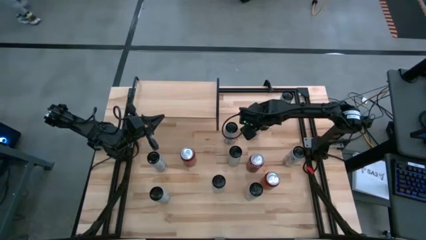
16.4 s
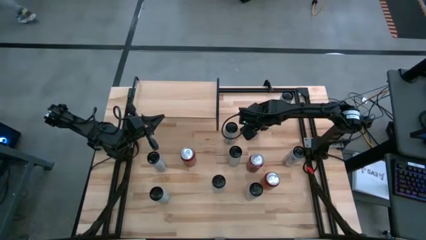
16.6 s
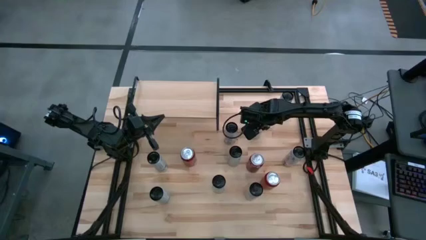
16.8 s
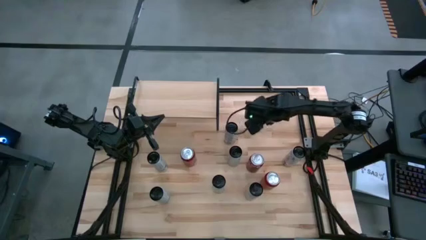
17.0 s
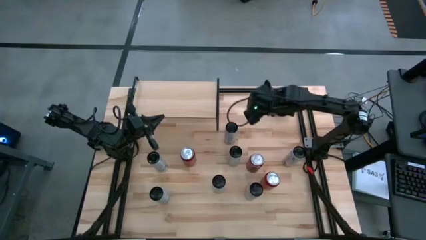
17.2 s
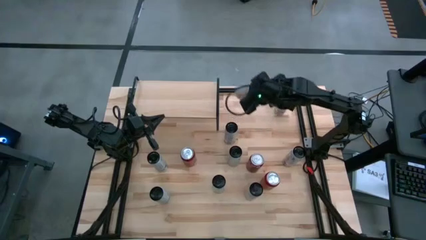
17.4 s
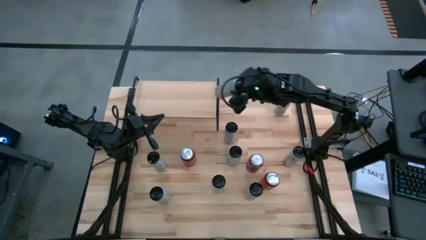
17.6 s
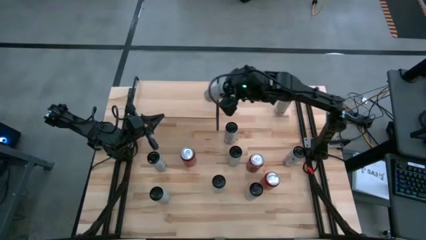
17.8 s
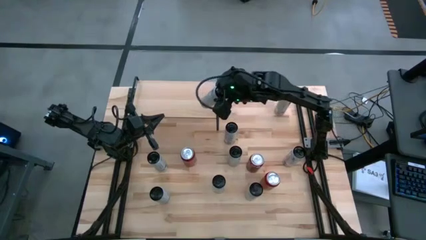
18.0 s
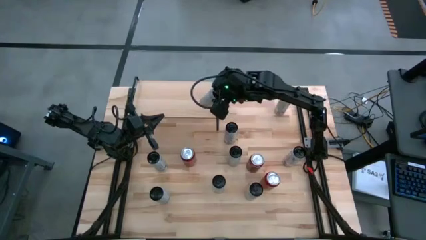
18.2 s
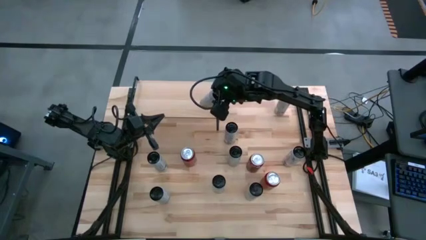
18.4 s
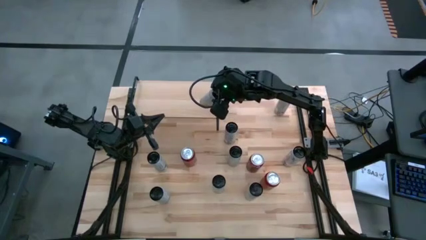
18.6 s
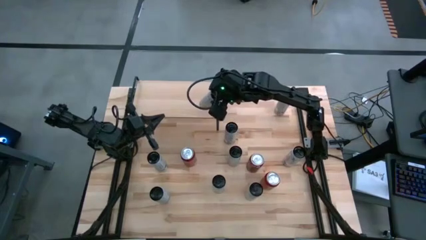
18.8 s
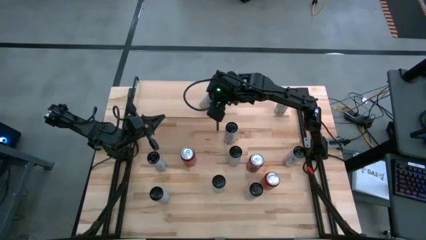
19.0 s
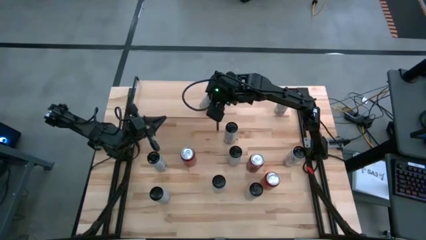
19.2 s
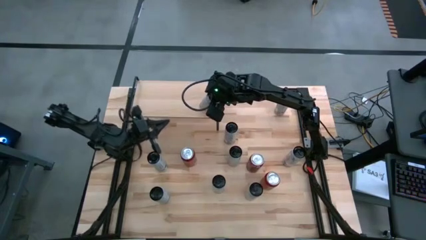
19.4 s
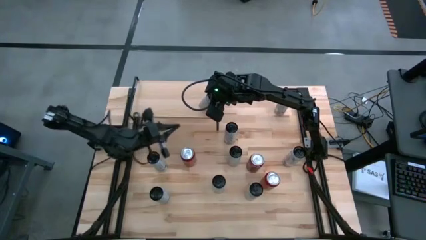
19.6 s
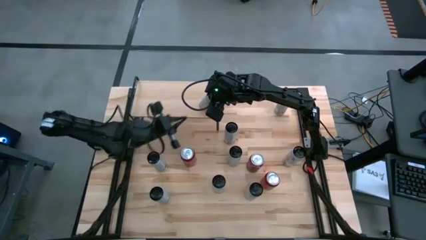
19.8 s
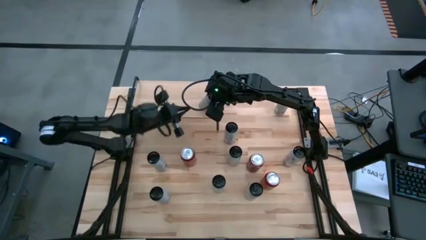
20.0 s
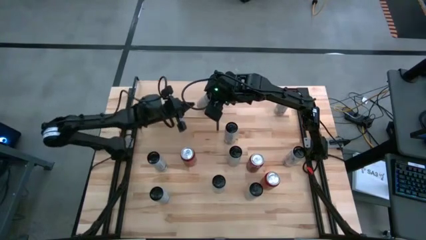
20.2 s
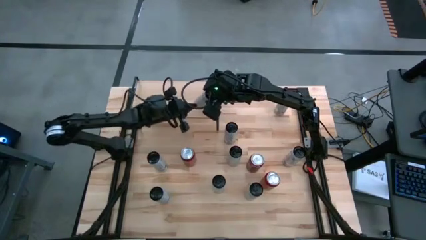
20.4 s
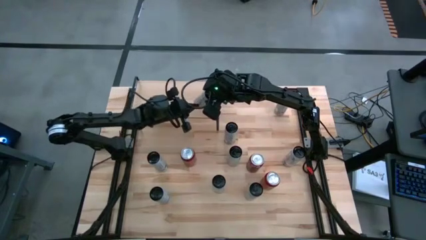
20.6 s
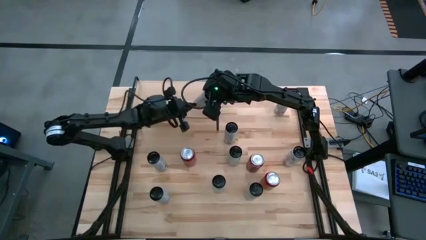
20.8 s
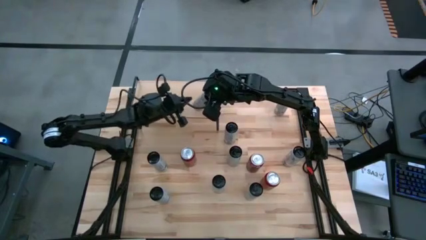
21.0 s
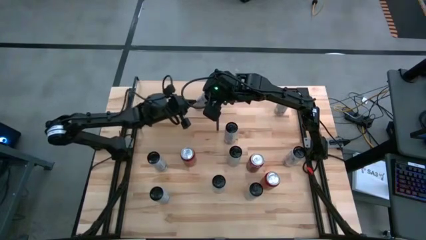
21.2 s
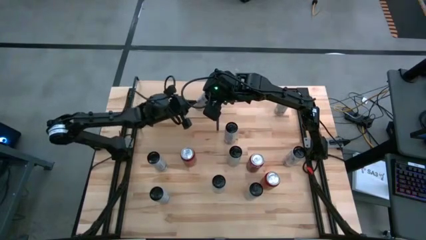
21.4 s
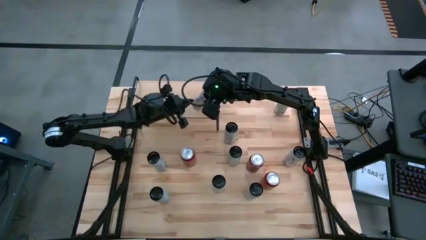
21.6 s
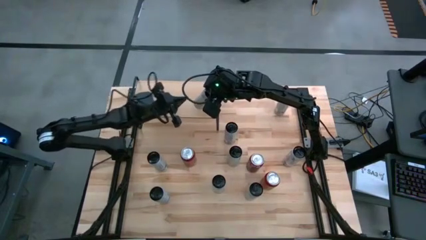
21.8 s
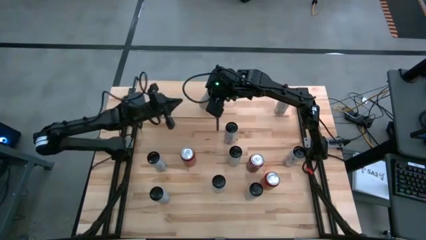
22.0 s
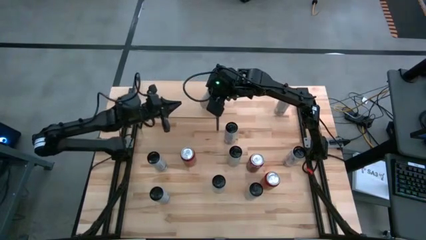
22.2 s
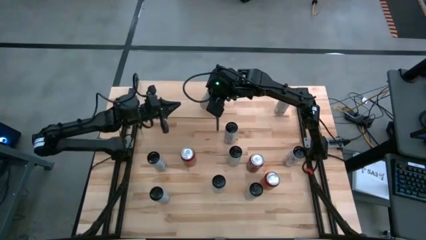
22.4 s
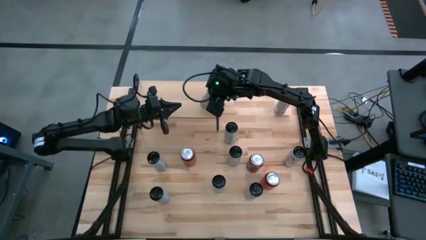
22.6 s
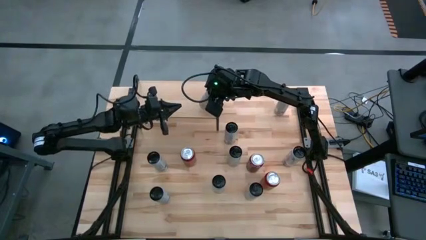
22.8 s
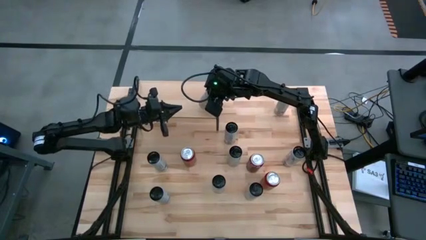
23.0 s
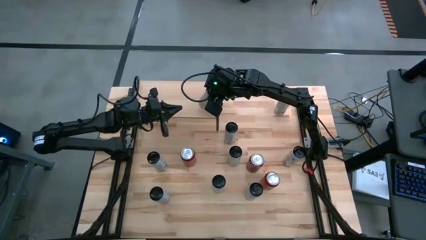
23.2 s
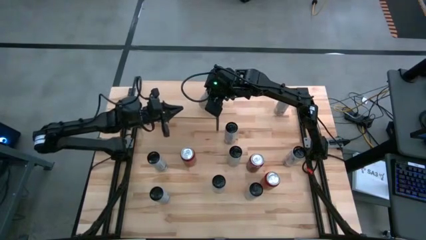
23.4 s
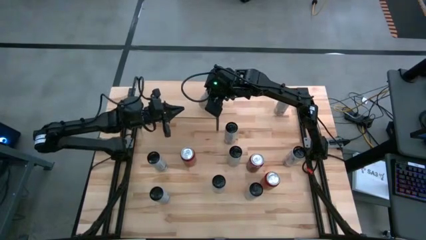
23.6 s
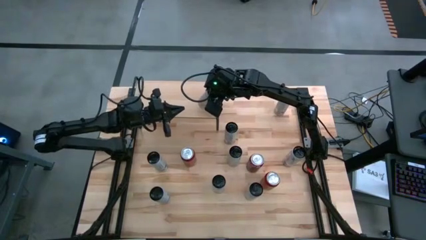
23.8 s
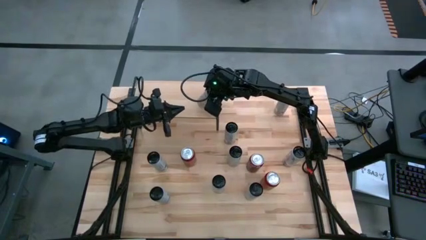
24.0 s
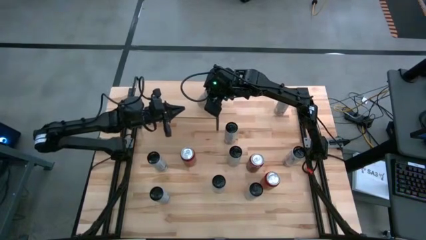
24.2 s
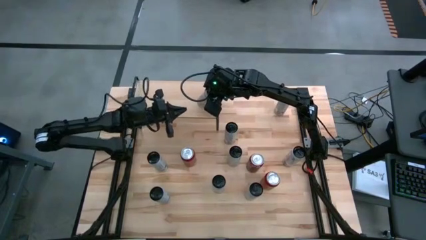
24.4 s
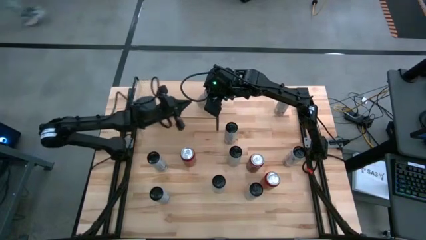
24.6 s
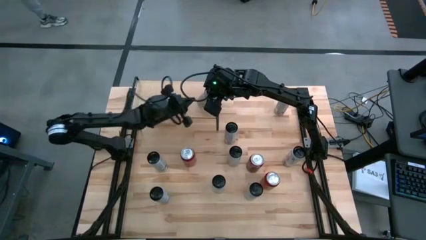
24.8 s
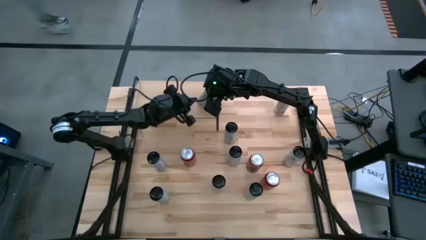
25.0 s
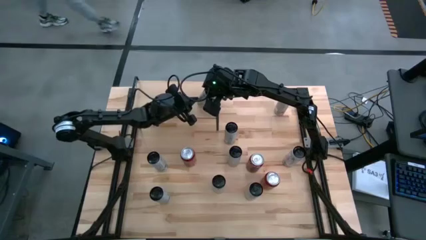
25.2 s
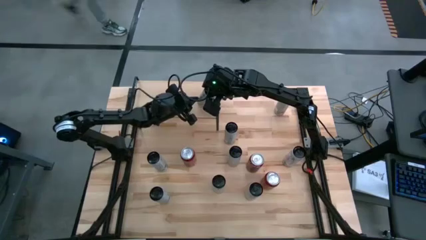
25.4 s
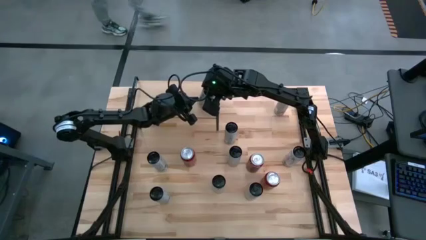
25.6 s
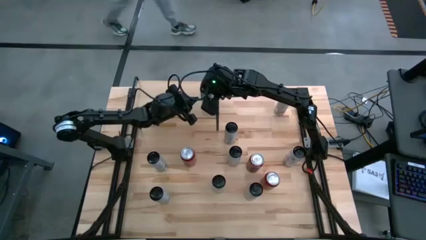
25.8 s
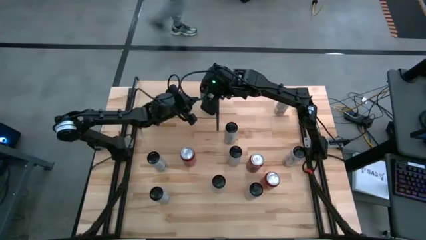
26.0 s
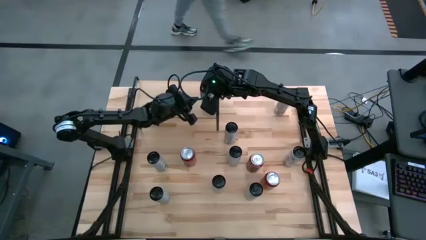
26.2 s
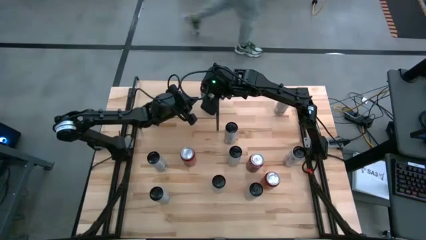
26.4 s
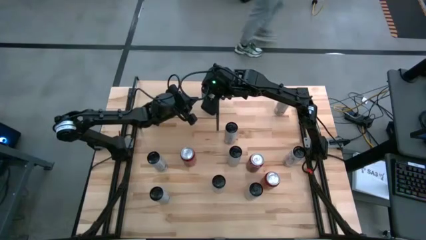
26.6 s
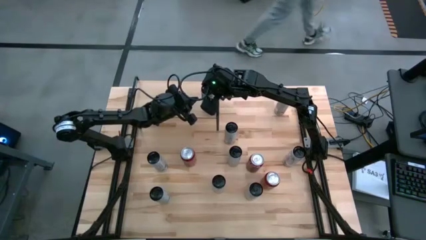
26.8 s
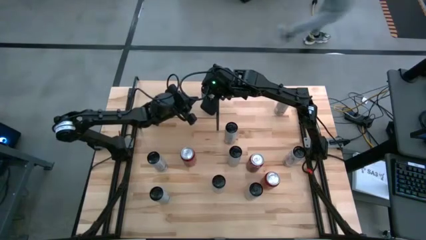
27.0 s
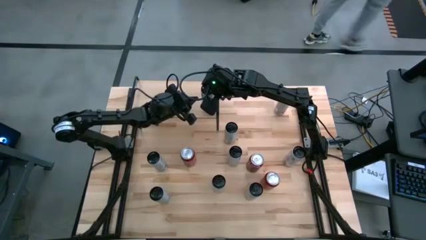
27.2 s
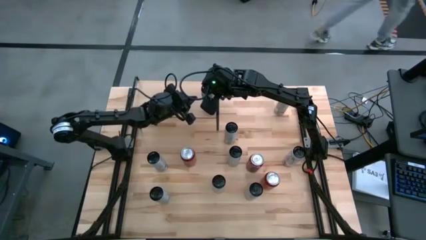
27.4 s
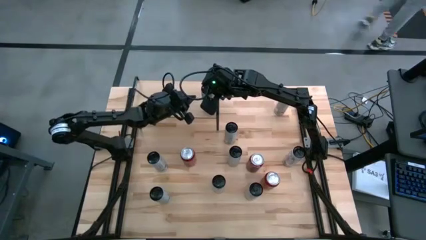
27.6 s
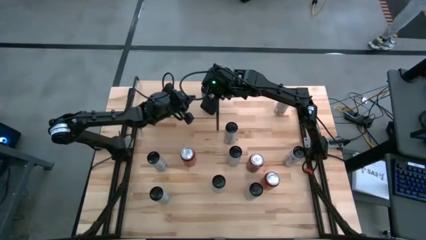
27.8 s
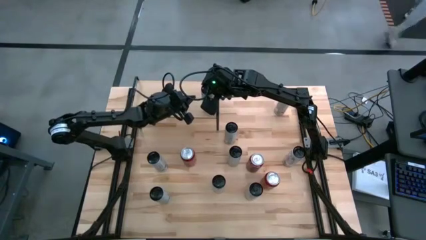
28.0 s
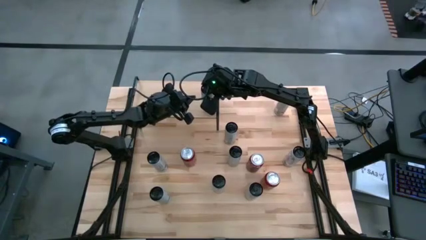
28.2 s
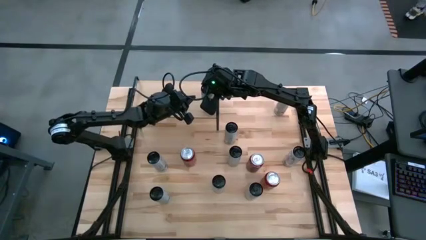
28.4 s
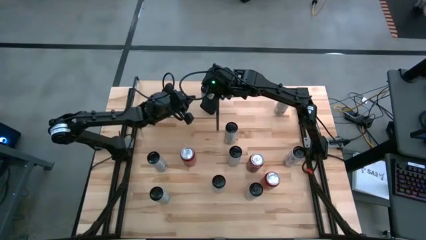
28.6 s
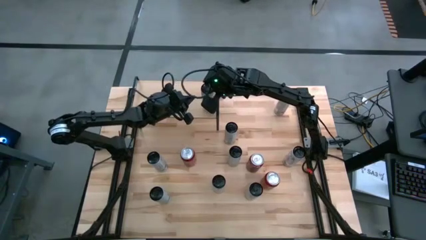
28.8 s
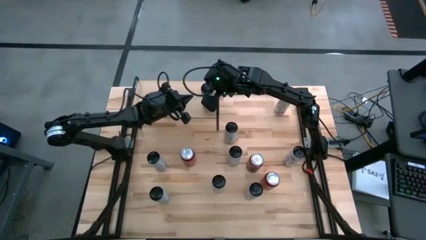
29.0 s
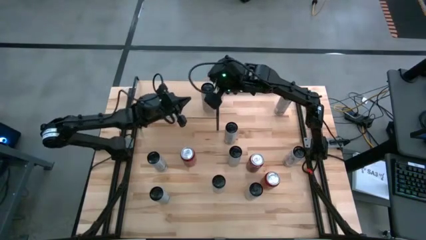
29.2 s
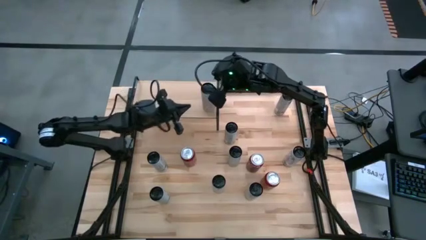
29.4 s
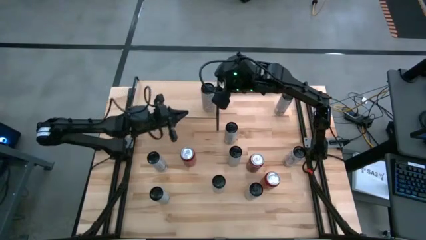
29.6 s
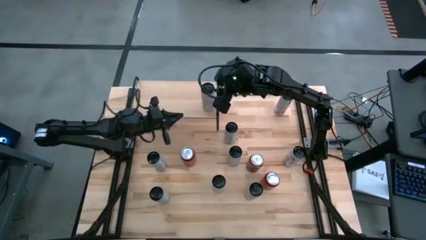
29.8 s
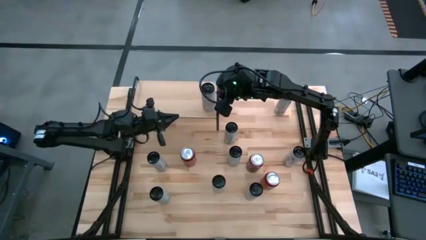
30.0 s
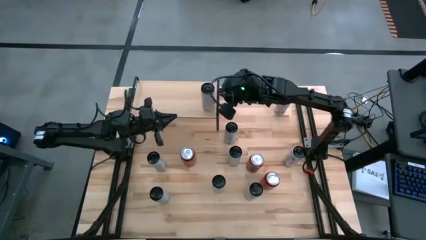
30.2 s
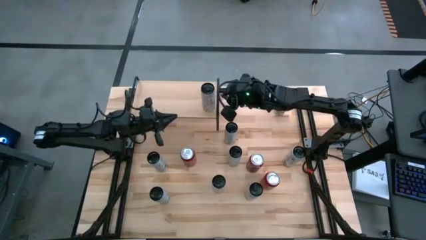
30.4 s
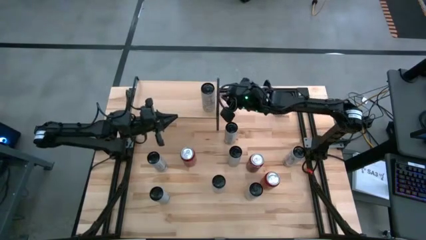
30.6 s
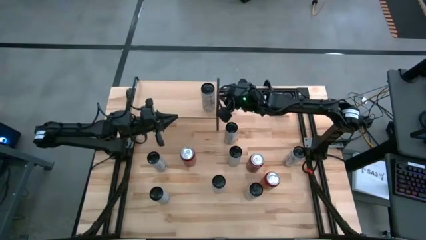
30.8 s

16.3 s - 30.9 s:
Task: Place canned beverage on shelf
Put the top right white yellow soda can on the shelf
